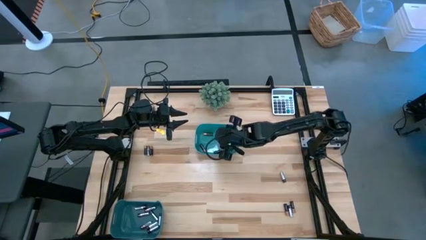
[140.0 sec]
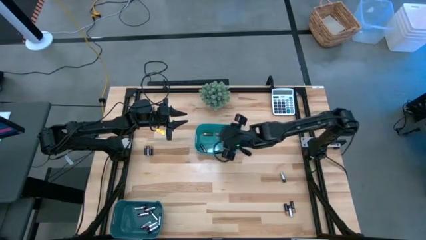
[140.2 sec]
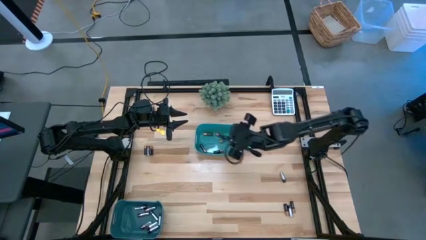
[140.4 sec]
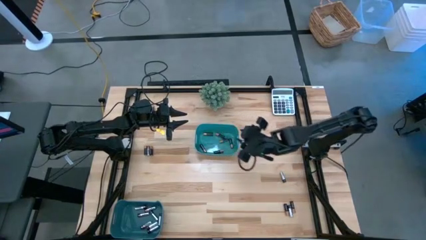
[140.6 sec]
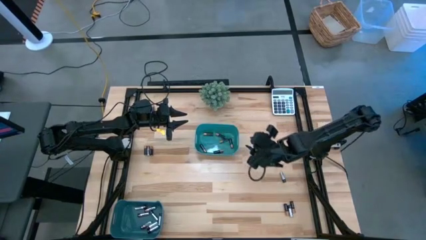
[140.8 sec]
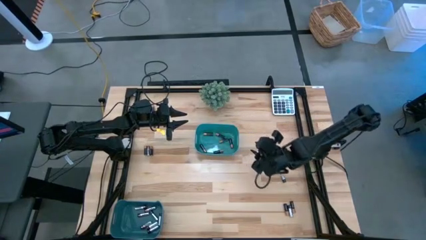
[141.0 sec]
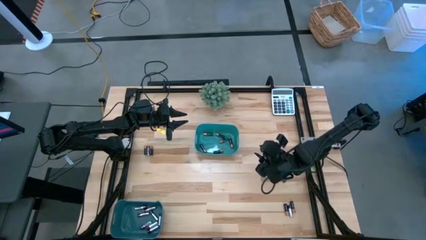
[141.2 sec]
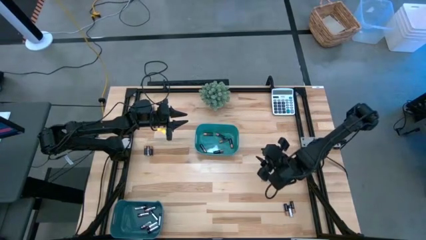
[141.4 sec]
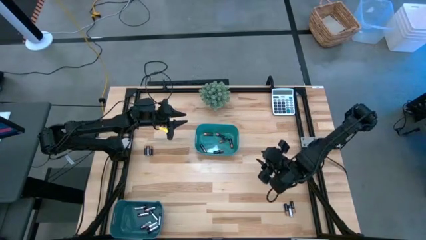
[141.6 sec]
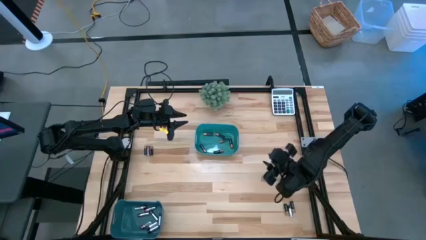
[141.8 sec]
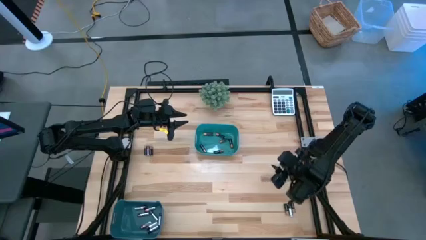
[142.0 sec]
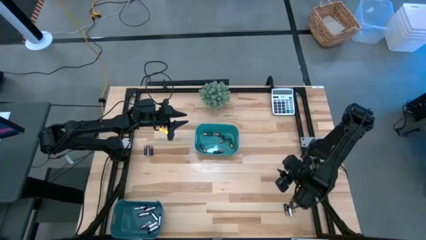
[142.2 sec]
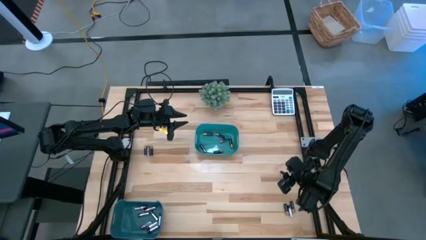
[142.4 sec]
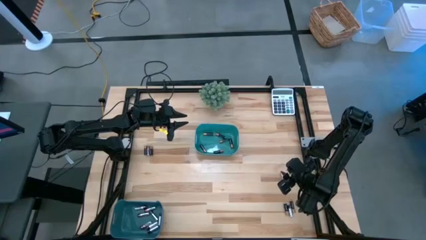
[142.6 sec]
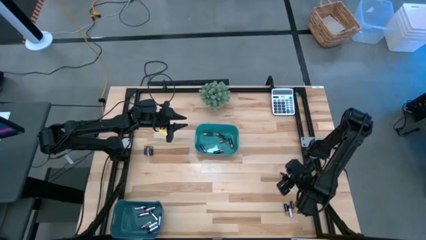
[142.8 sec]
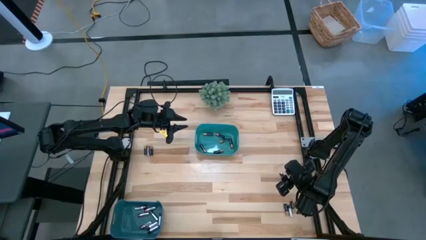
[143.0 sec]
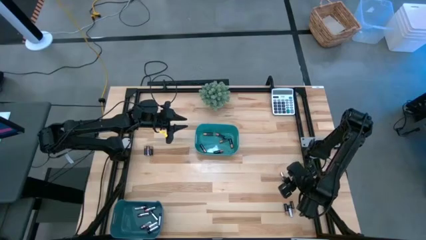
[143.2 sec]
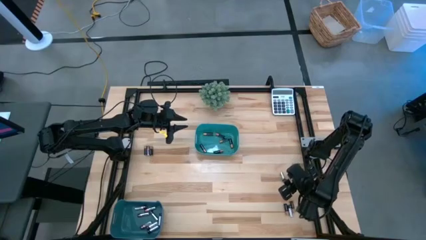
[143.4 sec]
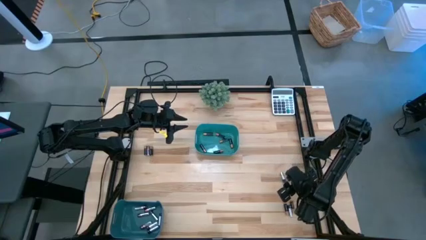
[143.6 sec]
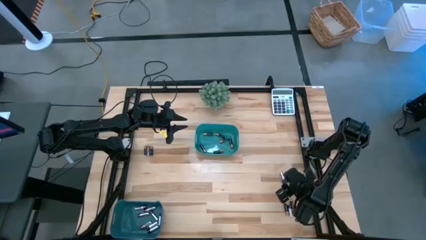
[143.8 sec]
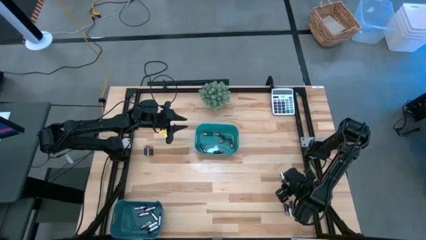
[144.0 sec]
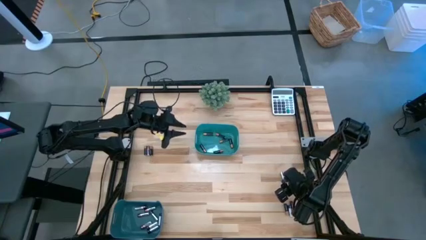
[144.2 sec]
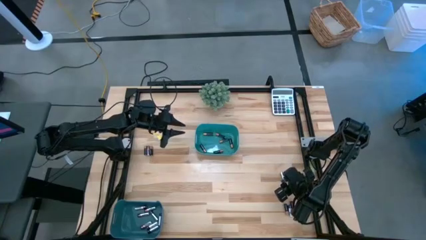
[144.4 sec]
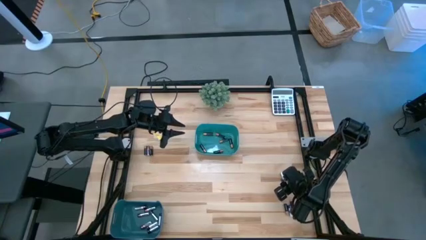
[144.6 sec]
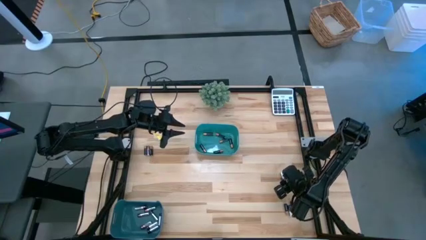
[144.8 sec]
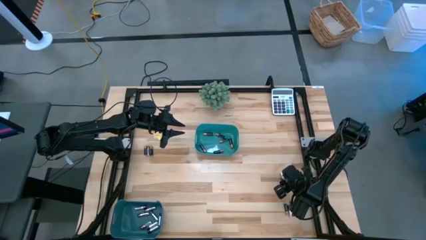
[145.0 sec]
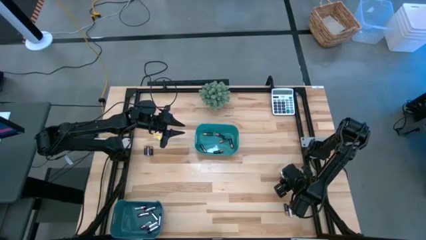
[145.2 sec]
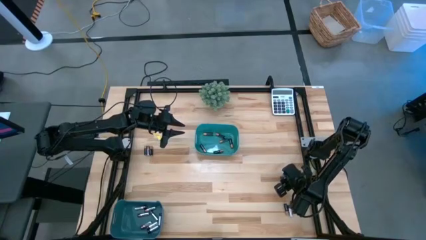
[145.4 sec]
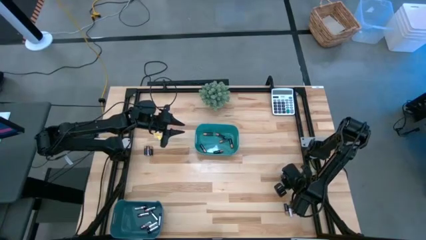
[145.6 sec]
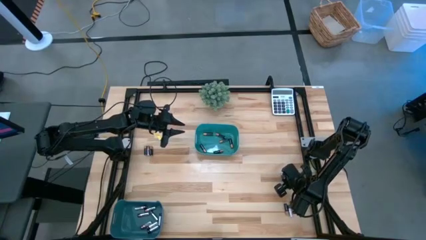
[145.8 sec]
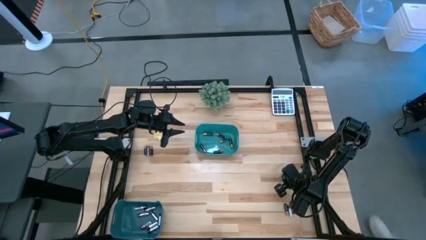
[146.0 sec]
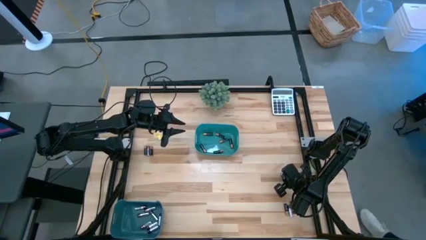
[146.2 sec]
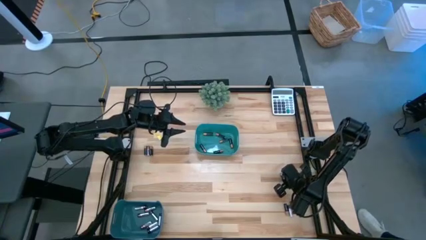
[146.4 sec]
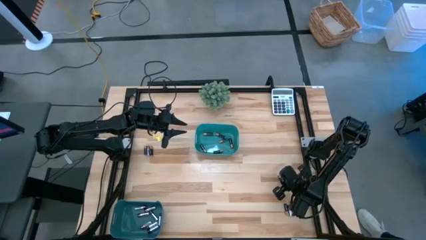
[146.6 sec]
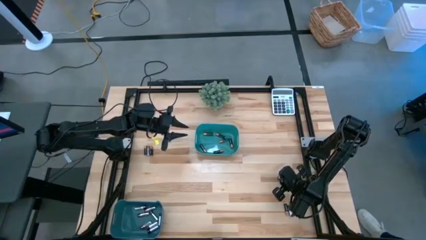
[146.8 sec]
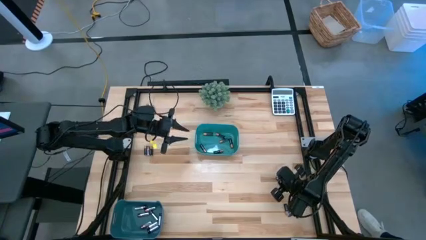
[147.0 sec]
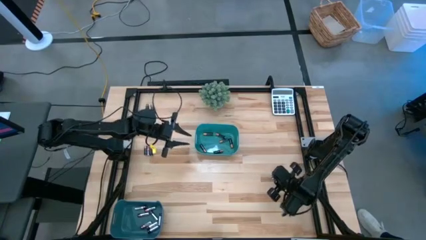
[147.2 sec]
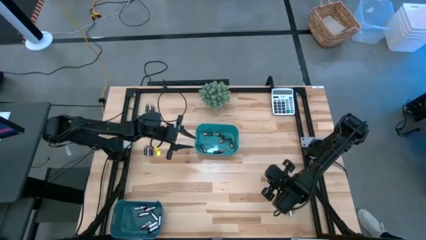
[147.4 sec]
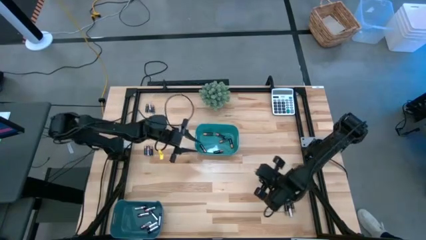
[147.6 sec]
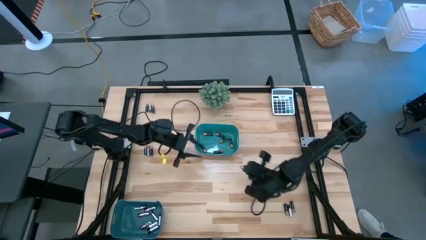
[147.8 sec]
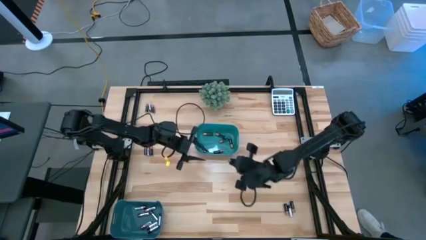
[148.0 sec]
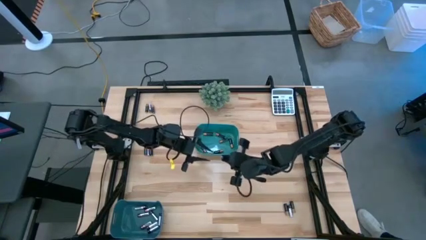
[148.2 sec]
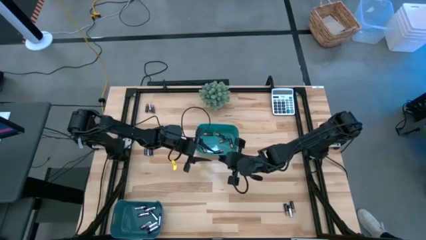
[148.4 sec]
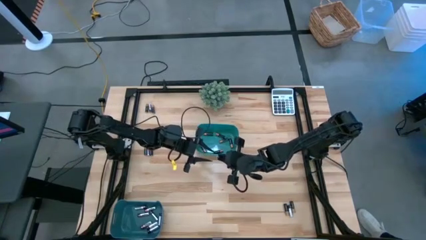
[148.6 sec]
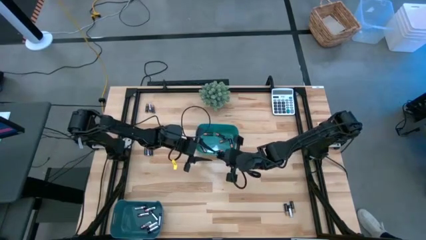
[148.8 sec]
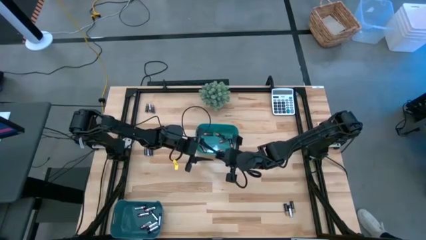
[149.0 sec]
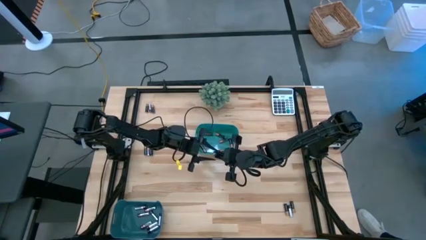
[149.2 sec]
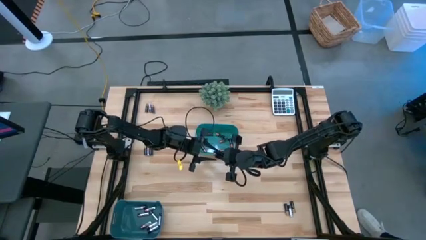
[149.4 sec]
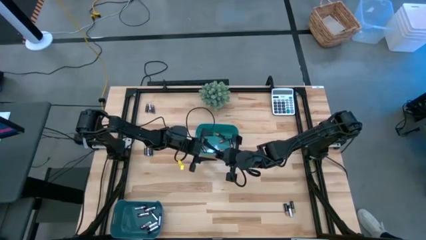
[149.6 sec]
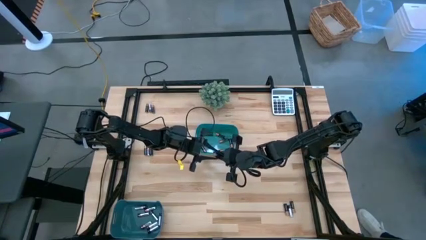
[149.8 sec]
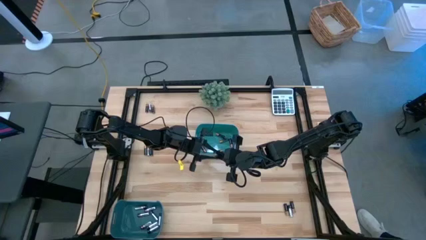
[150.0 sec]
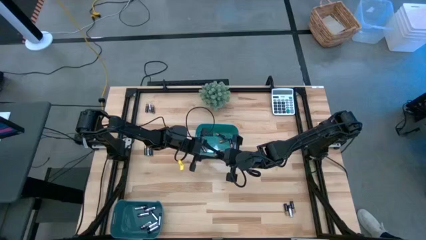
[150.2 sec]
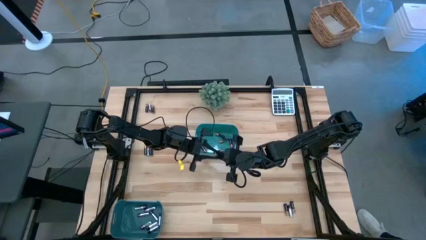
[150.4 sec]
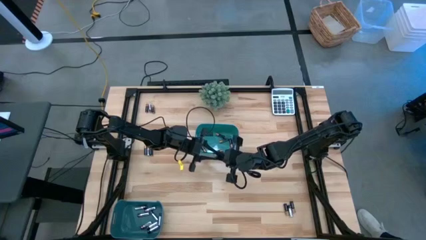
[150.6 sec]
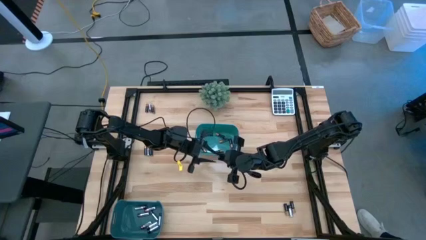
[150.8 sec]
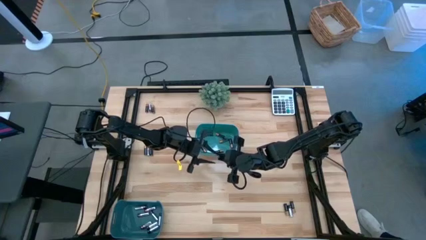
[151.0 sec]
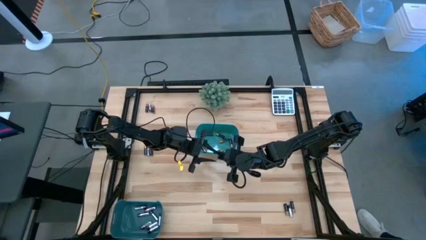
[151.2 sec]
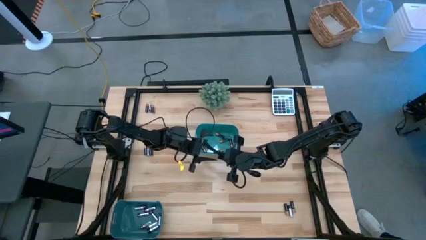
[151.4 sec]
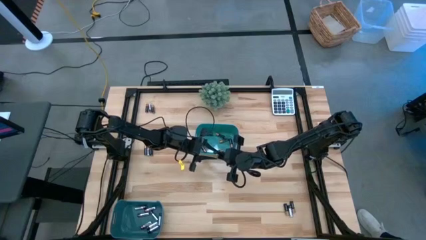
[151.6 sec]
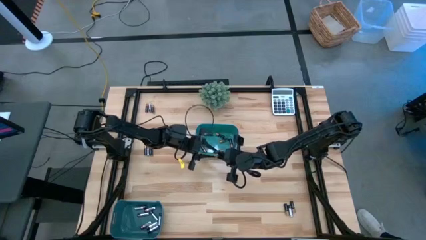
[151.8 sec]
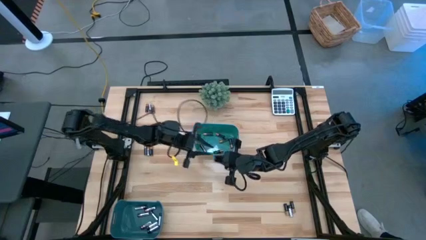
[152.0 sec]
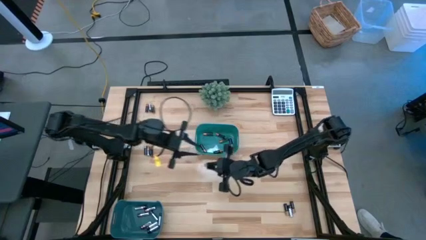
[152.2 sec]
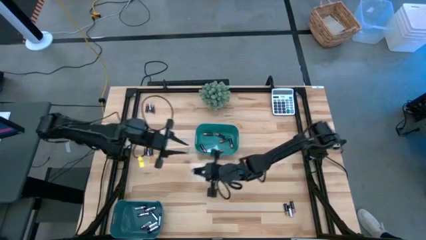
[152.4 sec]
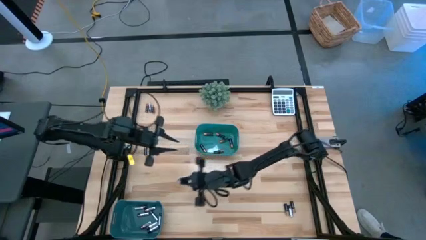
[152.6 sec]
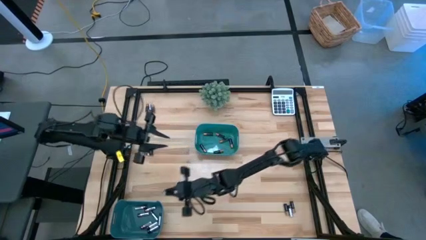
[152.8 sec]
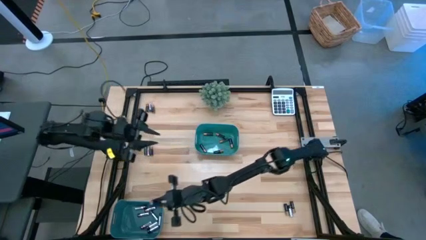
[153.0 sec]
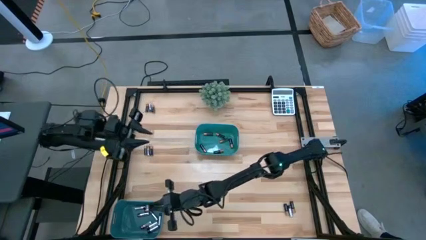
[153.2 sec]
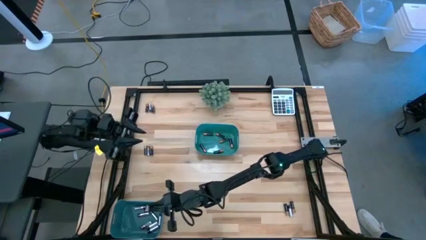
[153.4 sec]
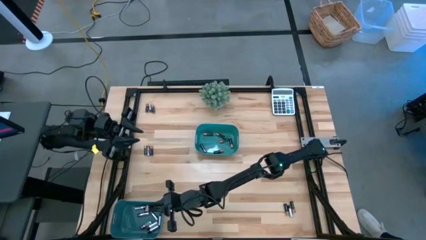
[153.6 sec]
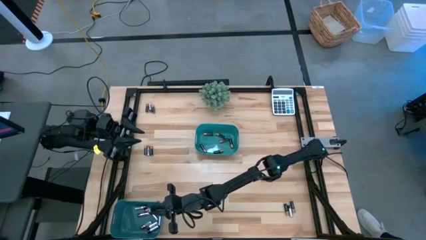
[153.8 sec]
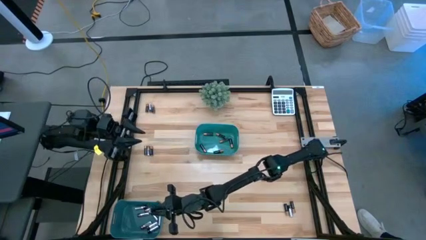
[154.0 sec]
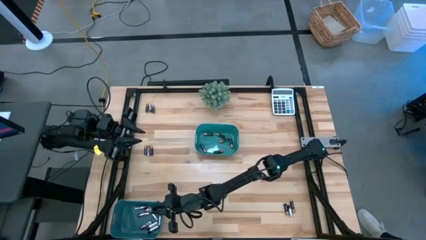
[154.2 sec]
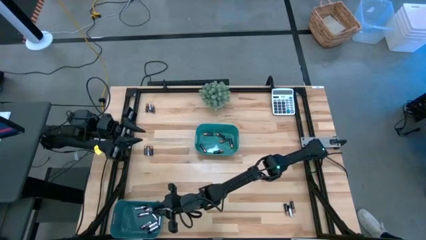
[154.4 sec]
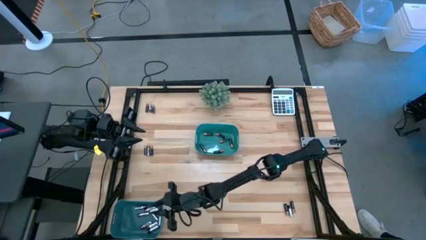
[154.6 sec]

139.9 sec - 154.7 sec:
Task: Sort batteries
Put the silver battery into the blue bin

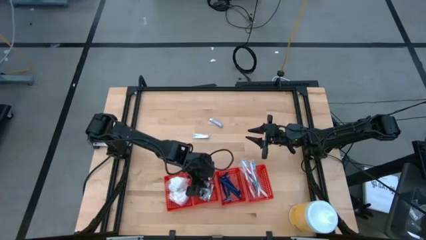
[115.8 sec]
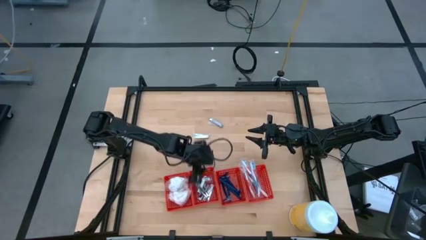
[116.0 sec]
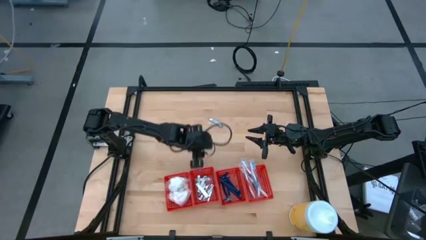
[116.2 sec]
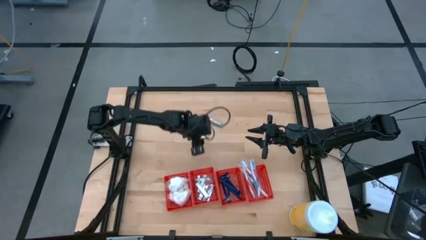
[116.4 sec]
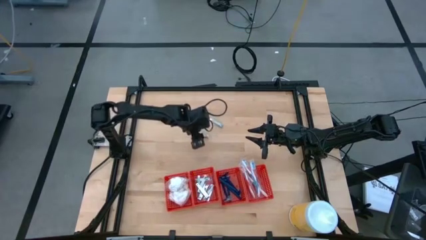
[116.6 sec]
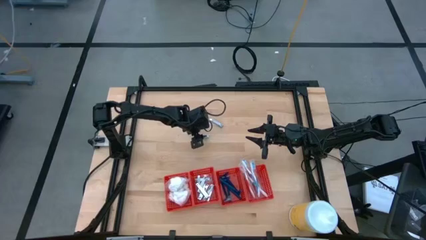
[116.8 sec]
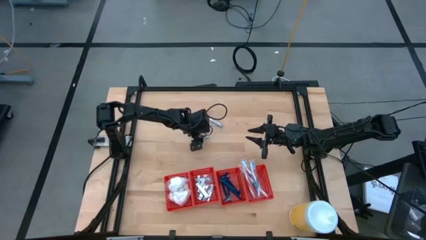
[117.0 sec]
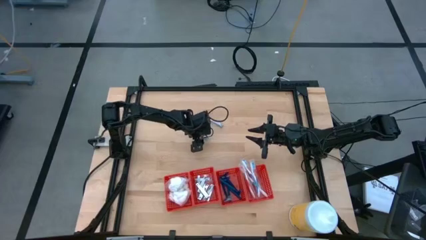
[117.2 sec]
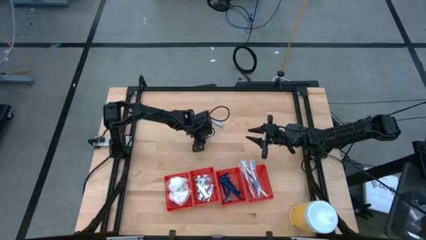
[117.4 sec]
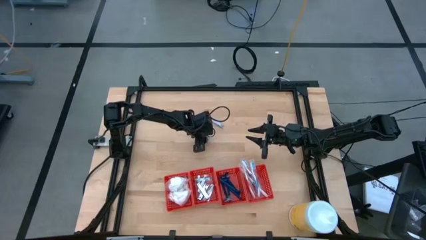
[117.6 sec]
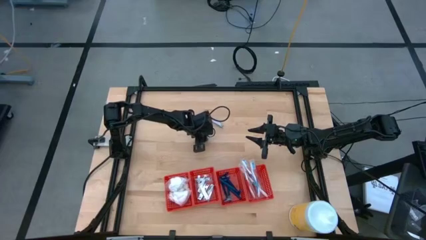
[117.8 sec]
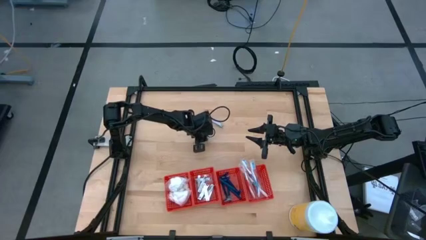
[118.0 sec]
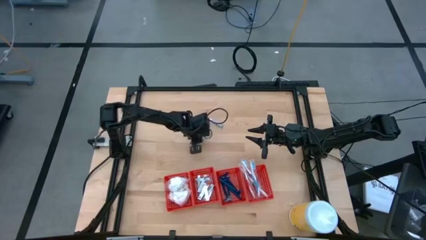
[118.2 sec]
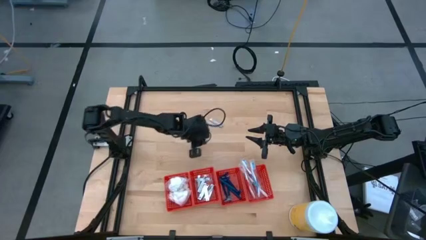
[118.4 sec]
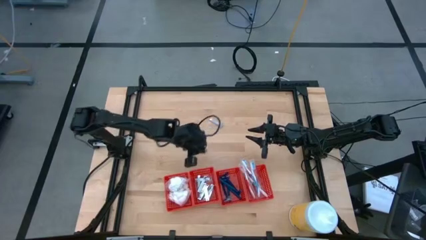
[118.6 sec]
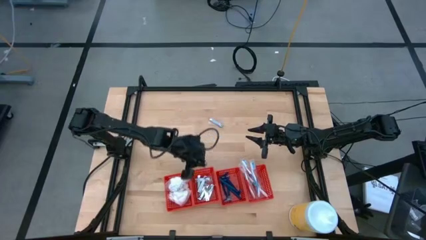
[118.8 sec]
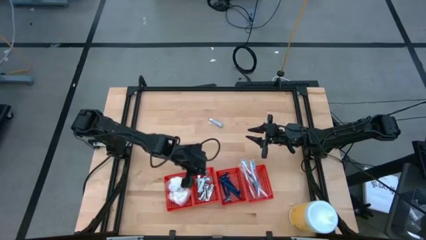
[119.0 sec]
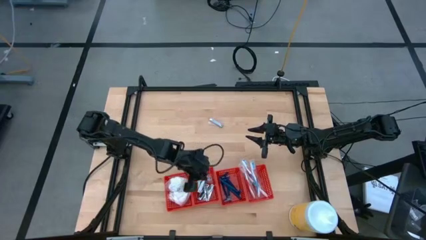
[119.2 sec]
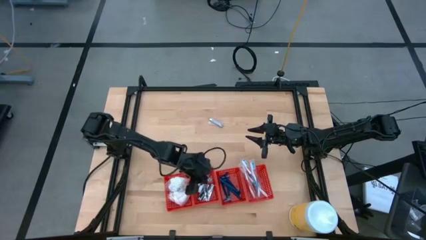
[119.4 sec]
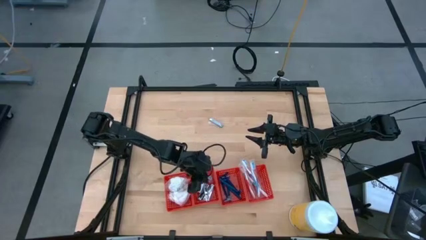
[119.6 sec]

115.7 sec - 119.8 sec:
Task: Pick & Place Travel size toiletries
Put the silver nail cutter into the middle left red bin
